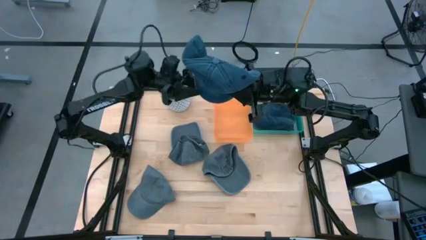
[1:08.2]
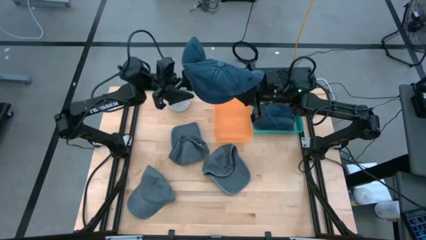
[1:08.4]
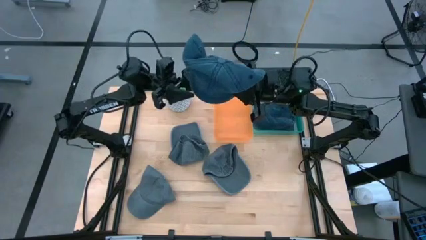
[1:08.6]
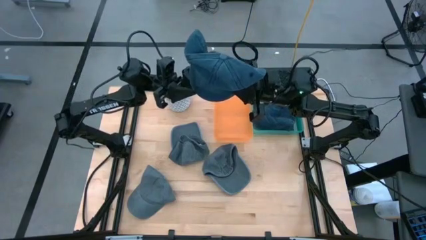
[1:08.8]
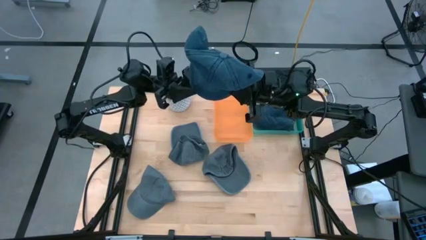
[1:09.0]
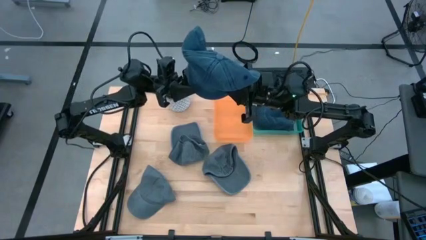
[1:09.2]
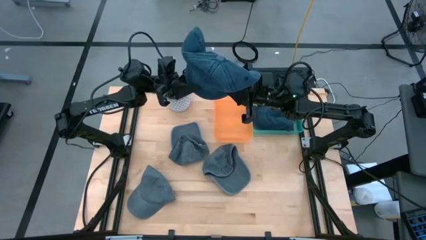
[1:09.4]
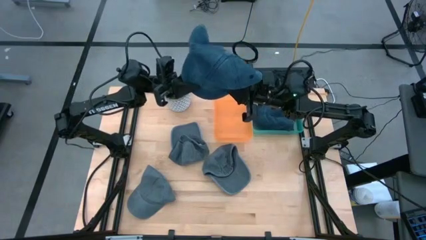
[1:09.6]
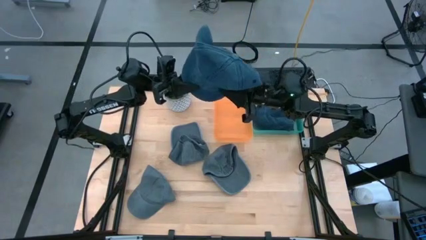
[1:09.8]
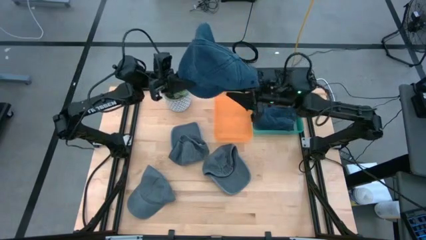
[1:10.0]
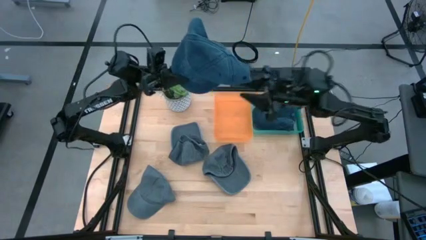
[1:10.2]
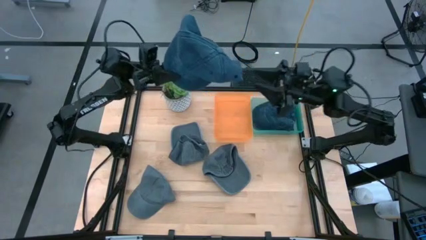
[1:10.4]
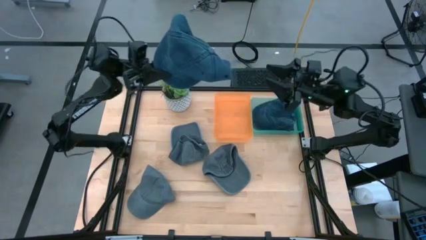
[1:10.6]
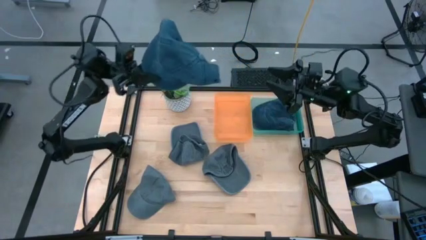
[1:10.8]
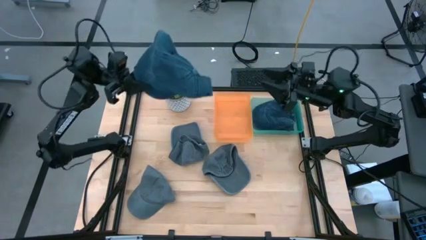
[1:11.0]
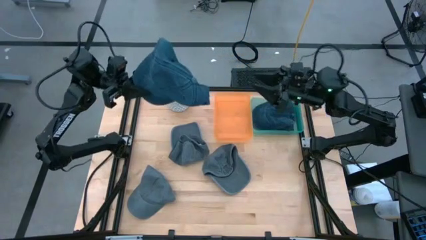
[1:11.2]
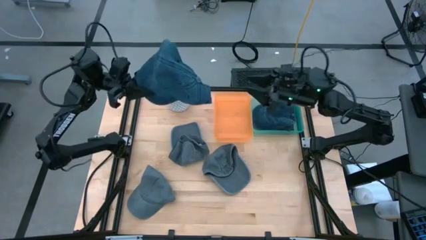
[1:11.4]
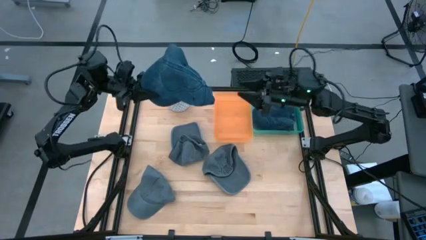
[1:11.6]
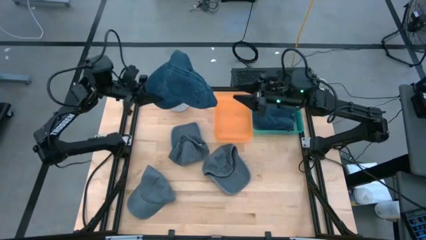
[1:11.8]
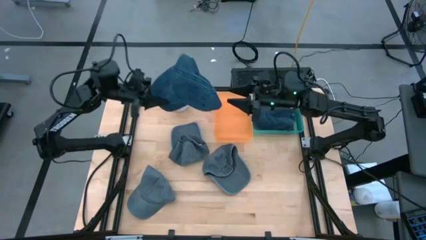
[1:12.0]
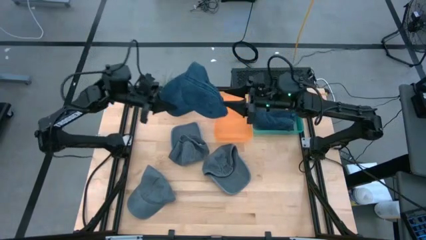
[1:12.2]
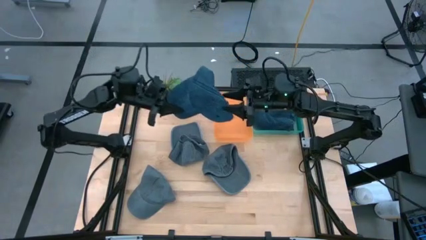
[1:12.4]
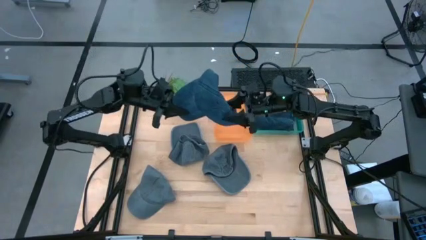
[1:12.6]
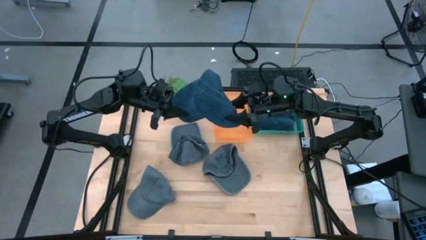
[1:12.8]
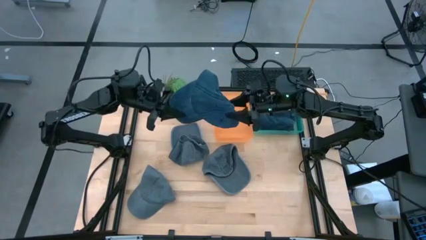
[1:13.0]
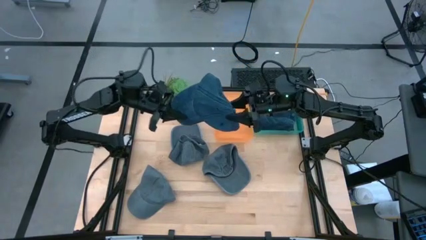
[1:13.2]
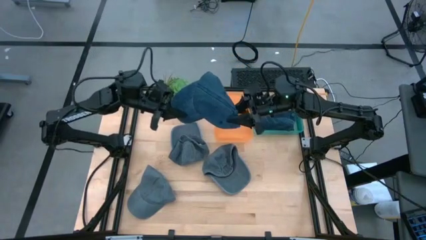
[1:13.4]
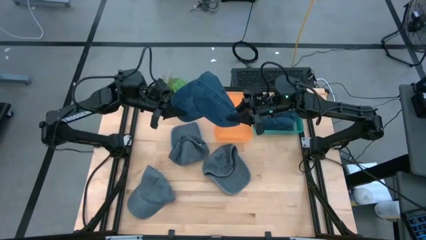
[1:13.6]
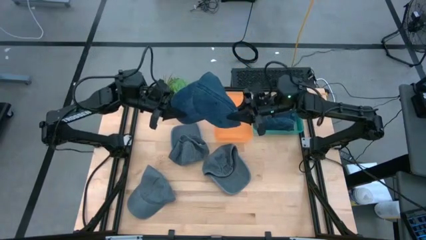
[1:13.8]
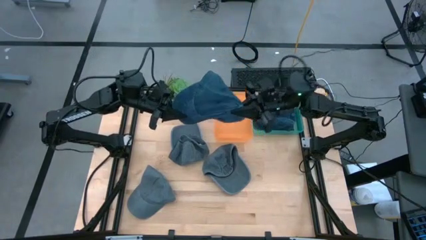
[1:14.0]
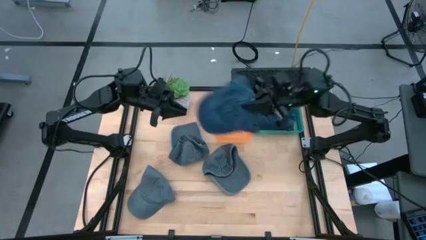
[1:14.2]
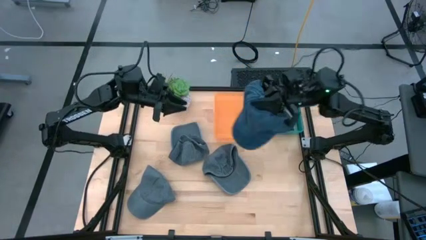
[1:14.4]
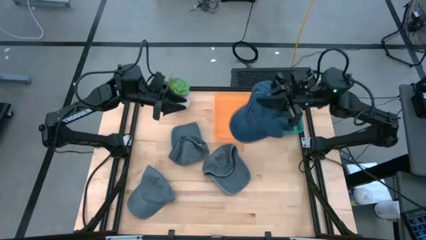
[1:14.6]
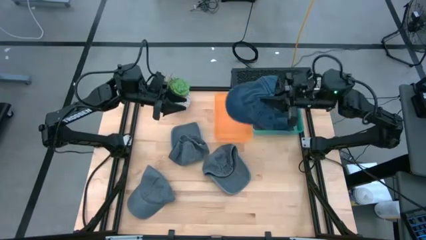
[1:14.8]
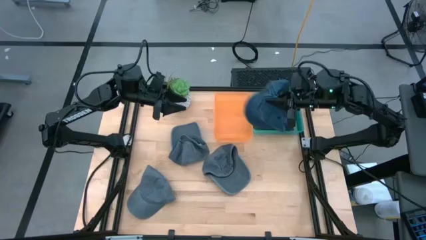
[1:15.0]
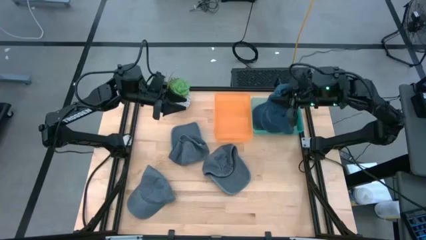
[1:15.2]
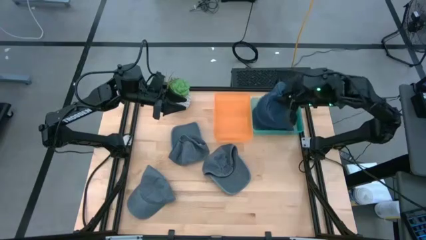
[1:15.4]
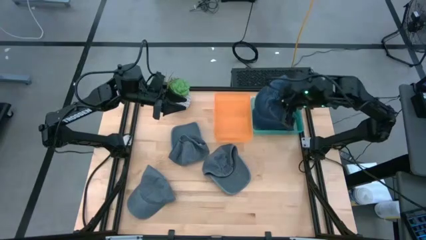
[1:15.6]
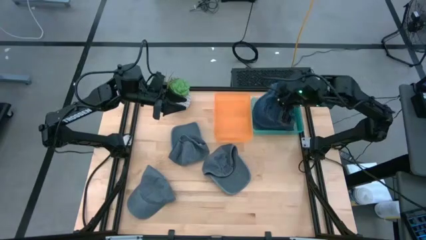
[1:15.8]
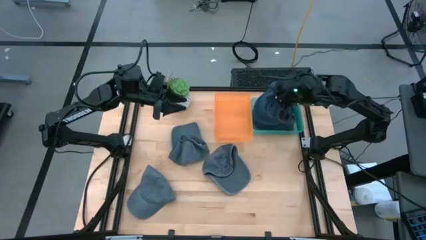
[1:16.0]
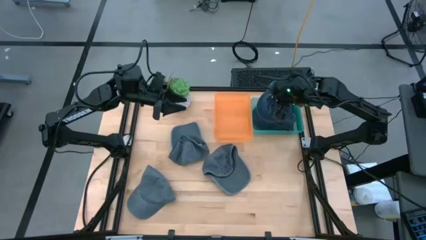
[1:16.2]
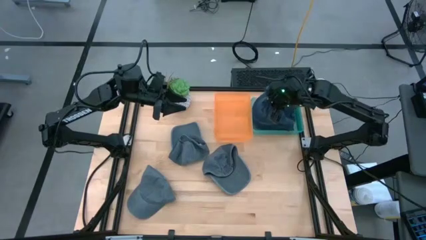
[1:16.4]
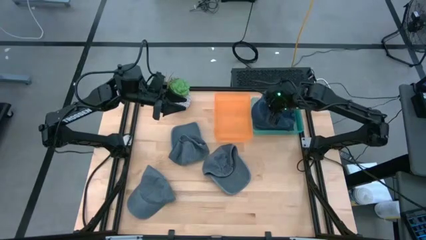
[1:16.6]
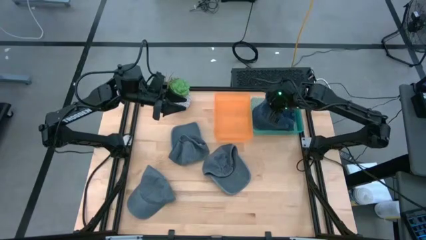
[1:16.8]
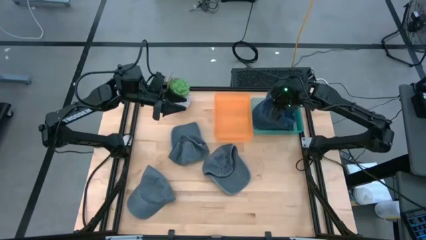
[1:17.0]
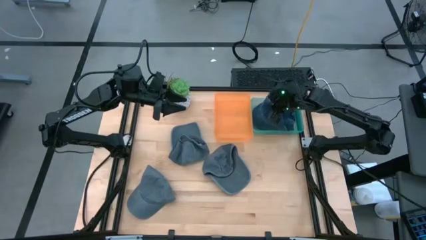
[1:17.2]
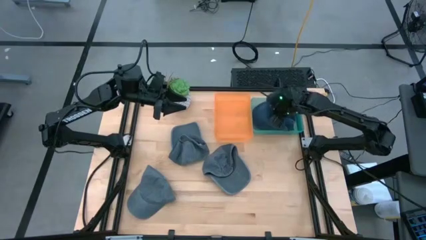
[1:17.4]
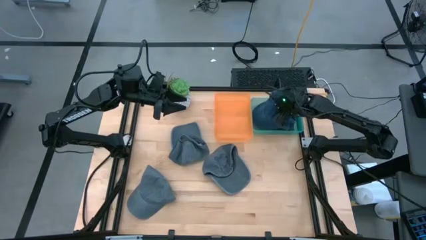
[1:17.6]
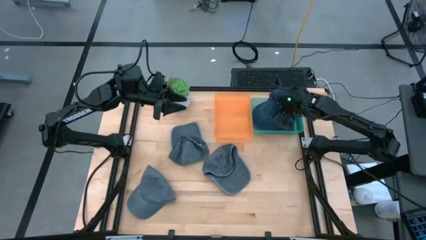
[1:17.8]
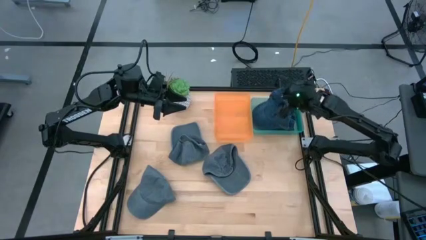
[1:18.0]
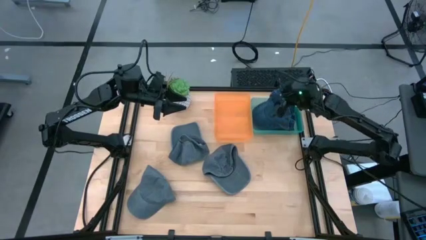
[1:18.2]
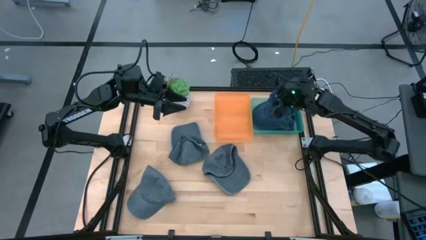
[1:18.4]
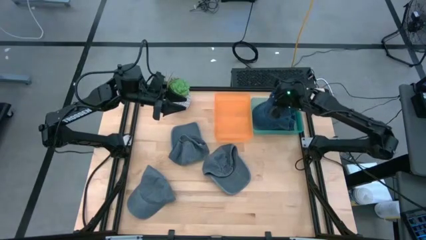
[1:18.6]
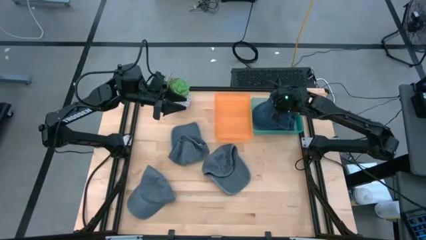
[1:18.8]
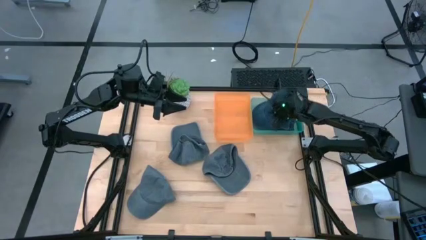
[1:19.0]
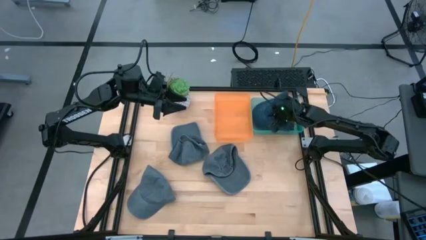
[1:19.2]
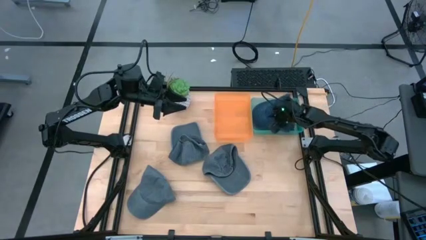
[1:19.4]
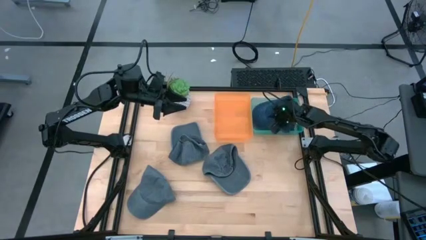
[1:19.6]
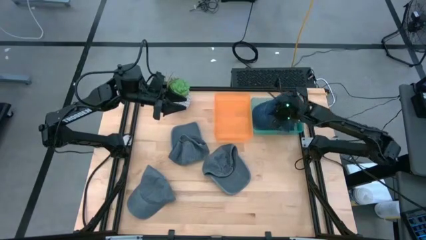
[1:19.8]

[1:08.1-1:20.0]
Task: Pick & Place hat
Put the blue cap in the blue bin

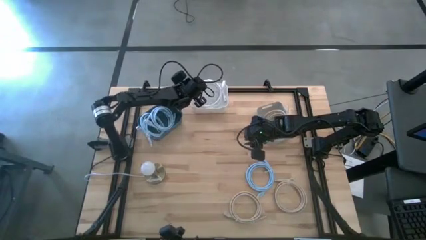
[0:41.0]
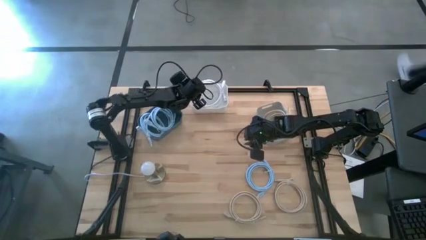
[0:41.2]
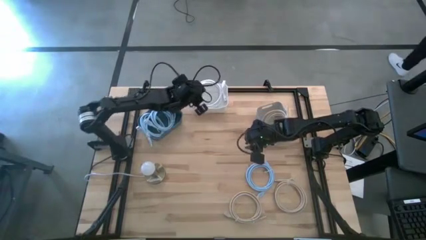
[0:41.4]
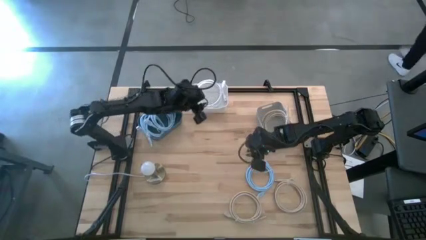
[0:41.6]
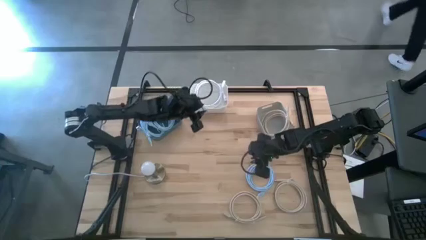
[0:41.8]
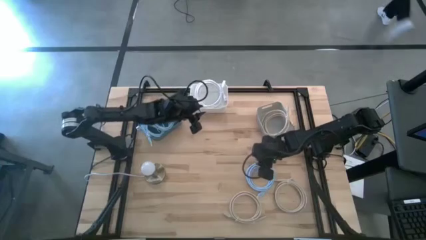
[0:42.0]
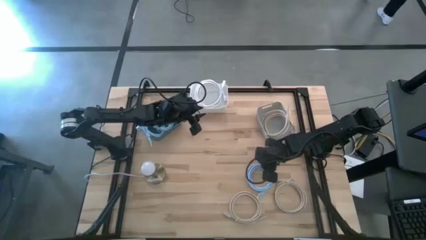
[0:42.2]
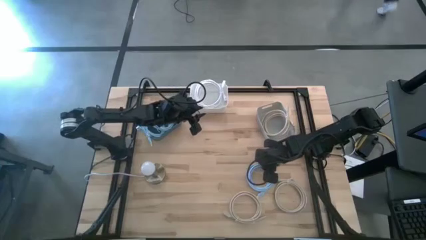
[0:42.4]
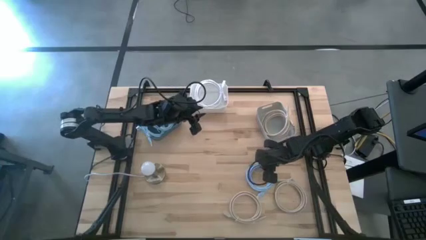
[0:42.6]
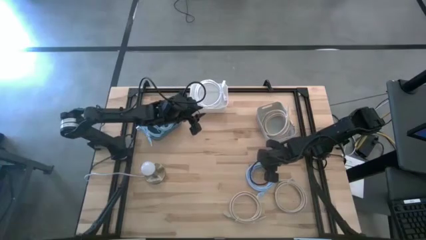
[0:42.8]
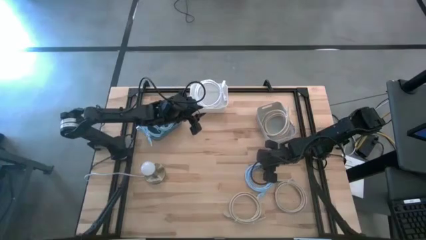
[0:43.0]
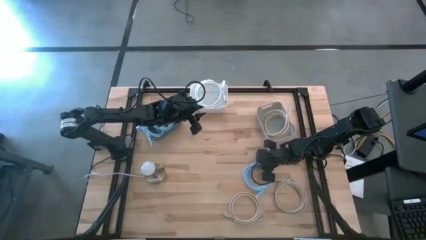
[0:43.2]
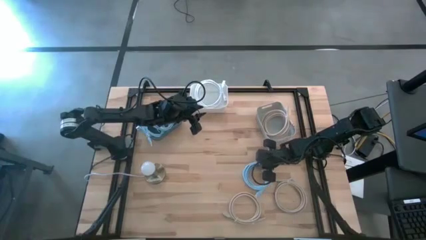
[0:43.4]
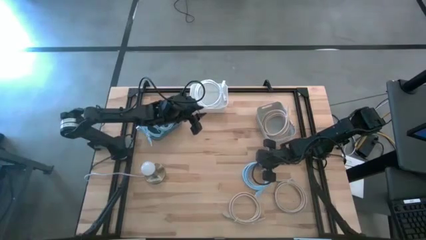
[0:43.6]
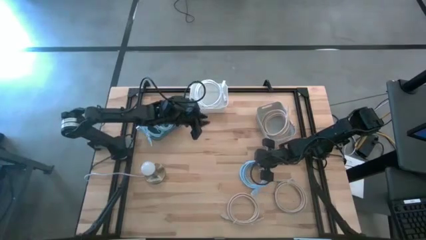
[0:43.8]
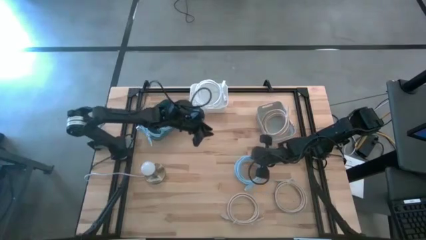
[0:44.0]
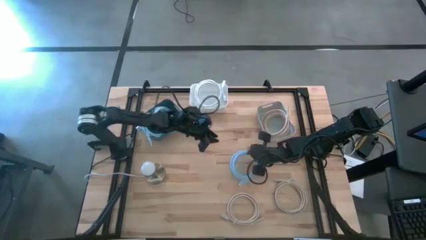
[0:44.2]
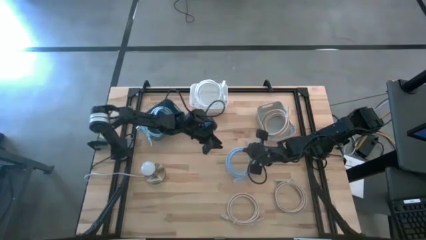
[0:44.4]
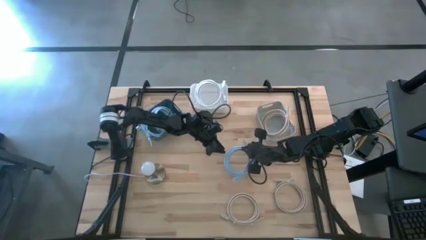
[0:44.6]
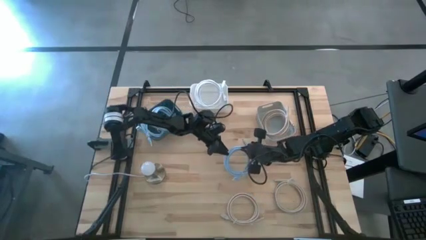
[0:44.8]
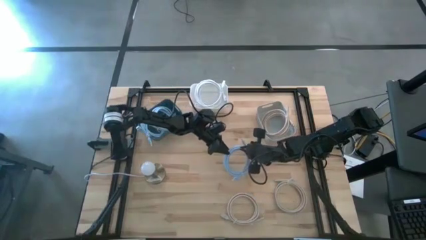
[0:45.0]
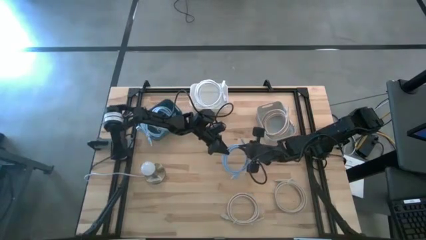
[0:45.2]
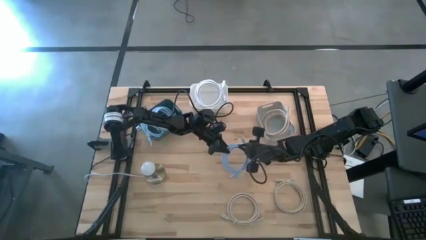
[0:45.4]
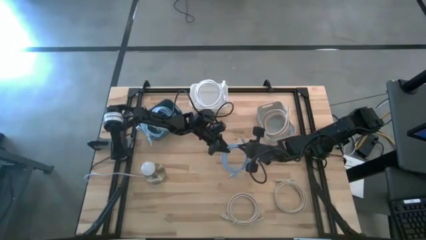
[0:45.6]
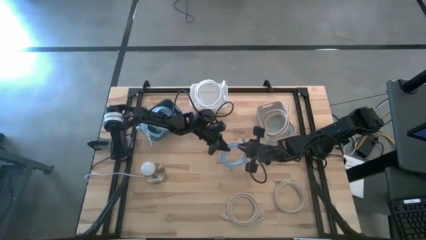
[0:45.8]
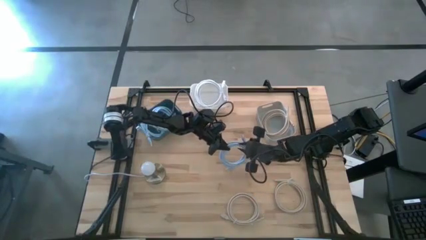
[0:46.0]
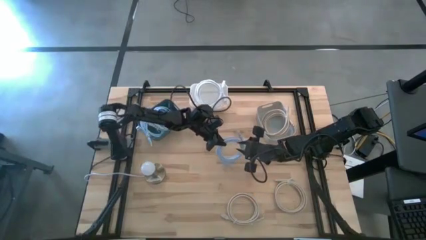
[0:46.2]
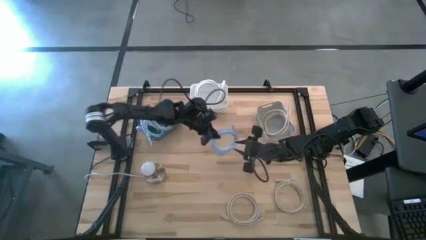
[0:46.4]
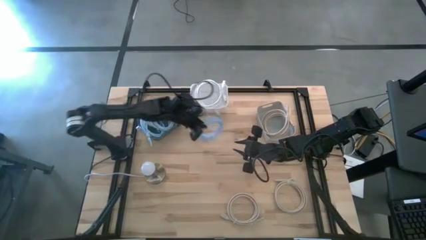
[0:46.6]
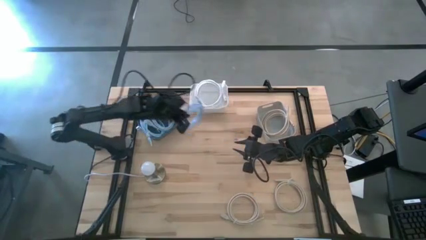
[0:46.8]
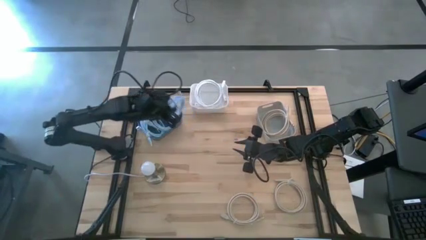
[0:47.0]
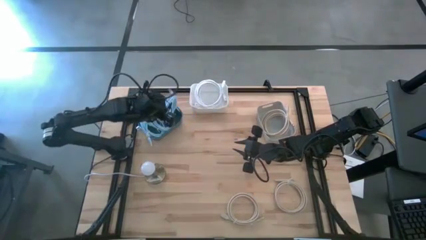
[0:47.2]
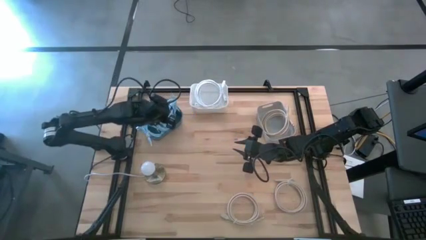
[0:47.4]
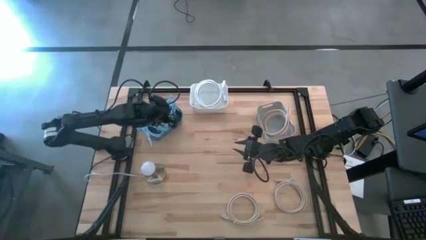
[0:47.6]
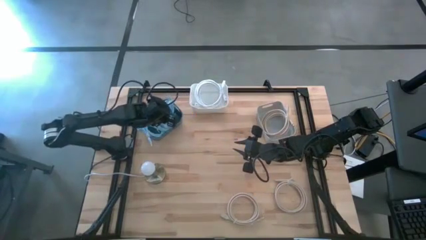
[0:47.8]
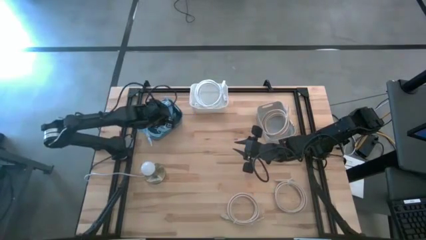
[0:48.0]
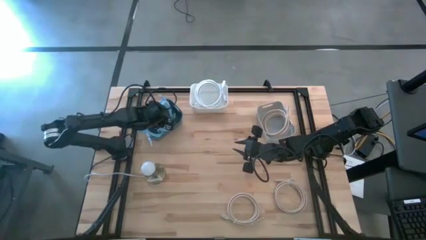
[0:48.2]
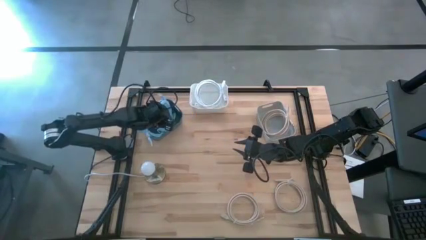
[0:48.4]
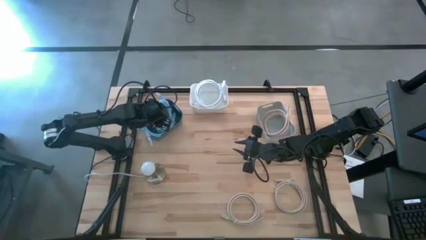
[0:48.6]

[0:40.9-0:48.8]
Task: Sort HDMI cables
Put the blue hdmi cable into the blue bin
